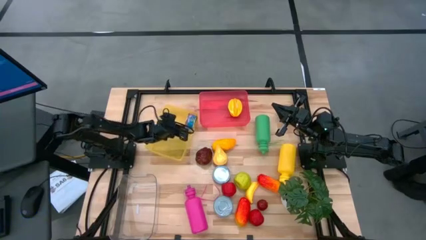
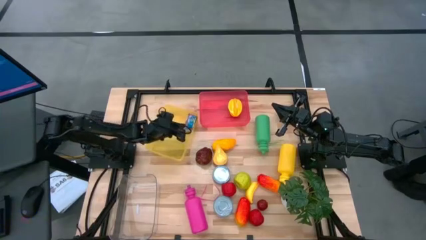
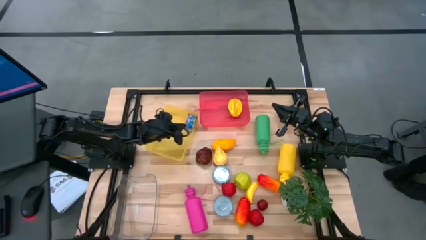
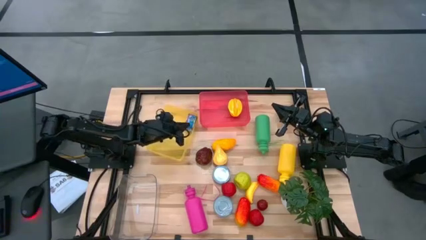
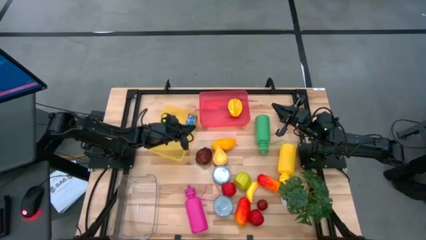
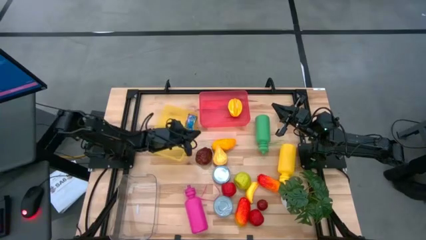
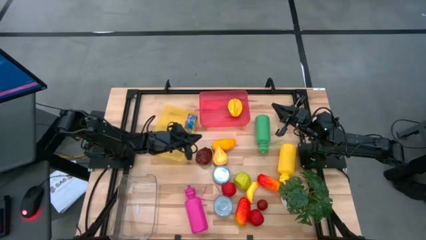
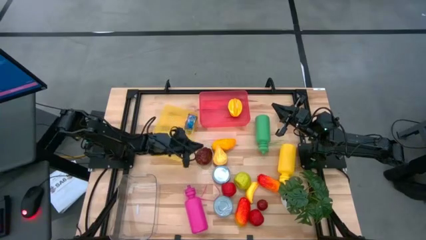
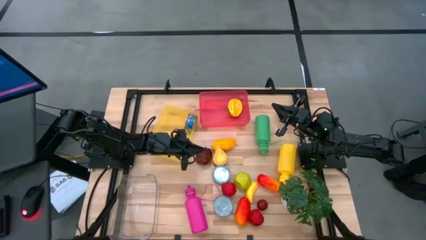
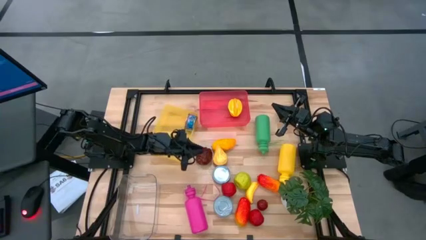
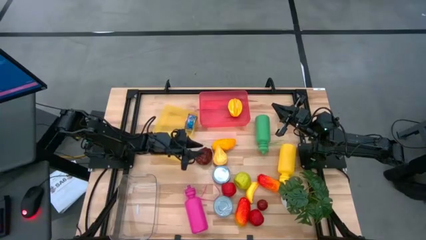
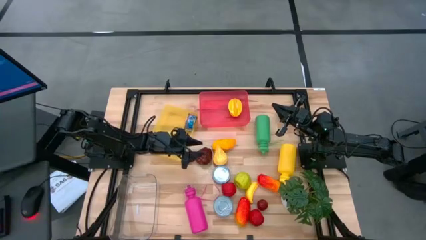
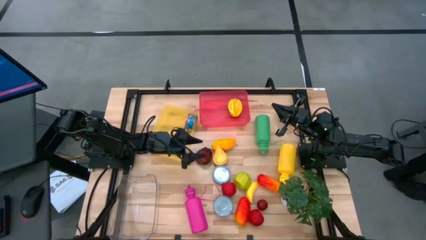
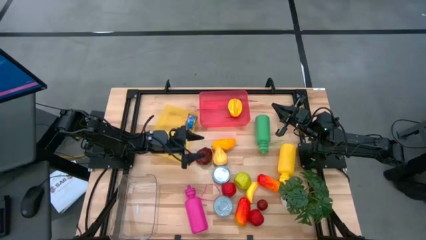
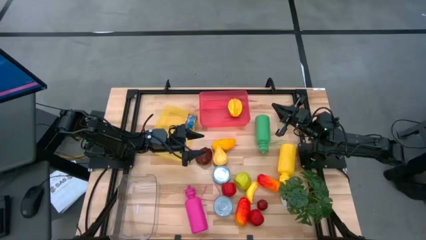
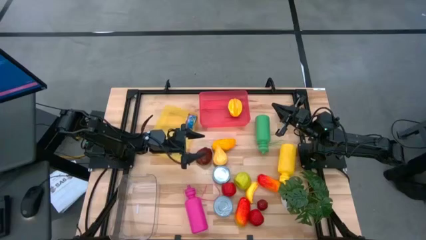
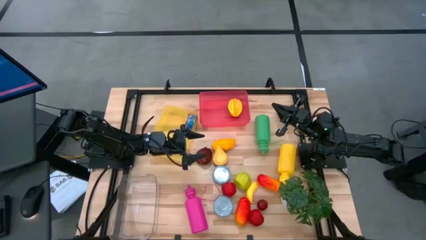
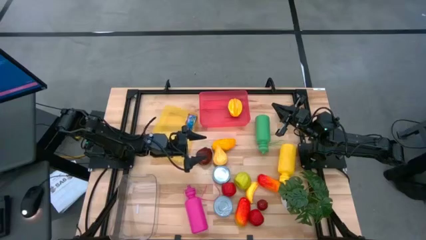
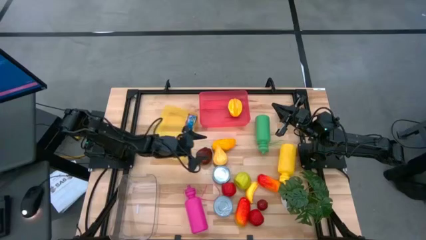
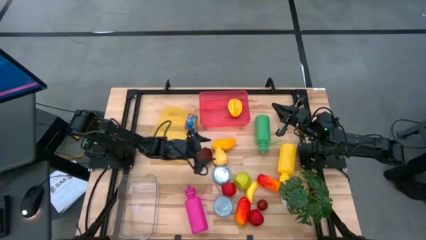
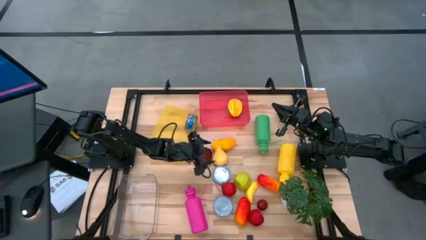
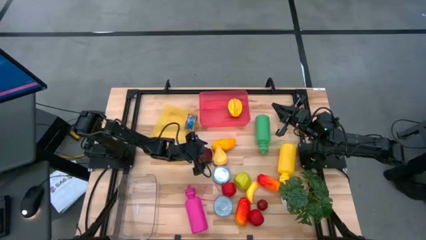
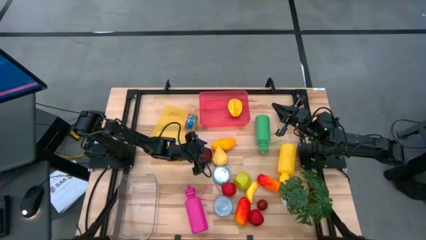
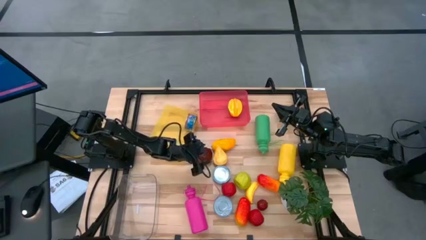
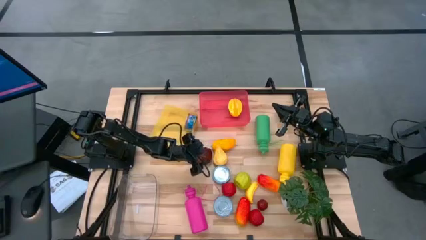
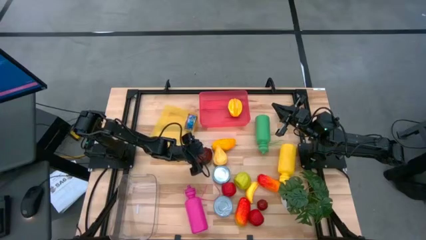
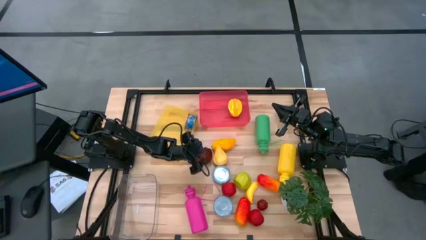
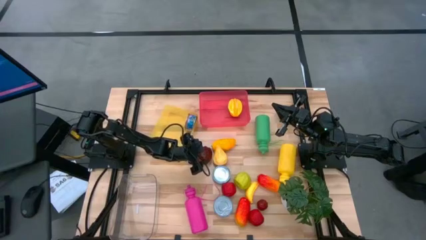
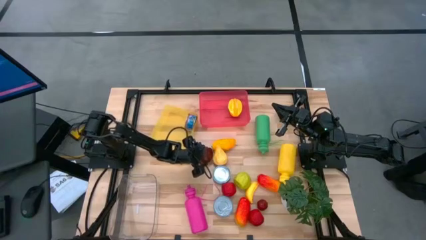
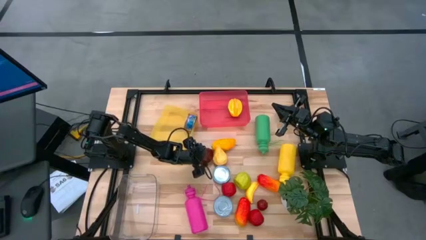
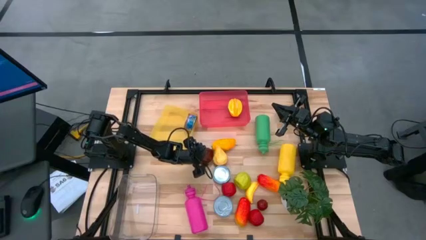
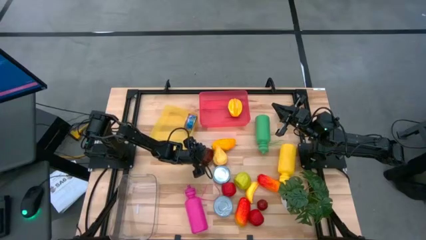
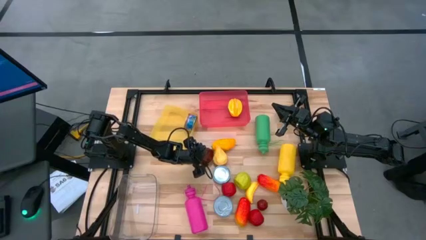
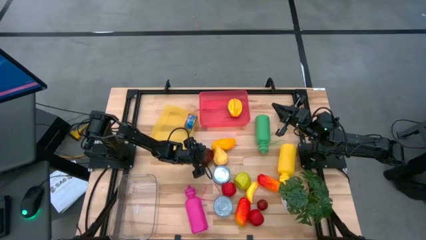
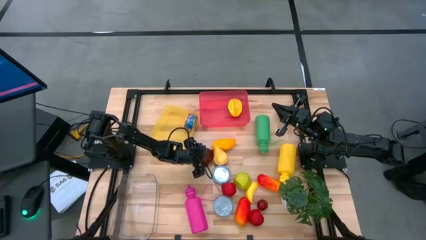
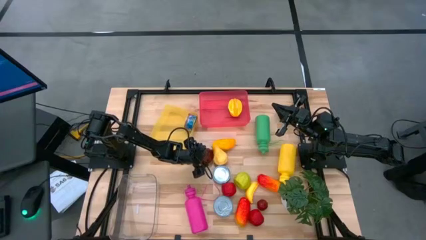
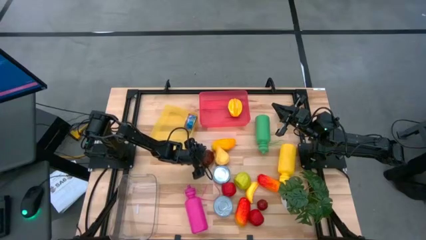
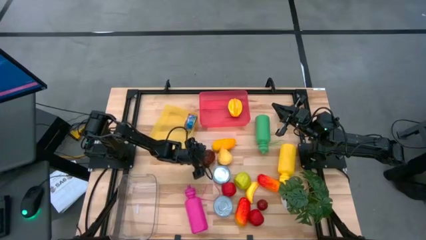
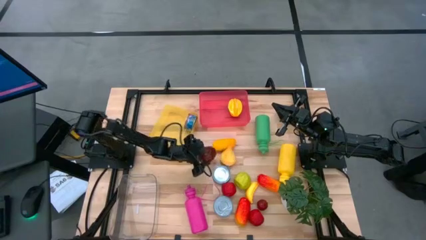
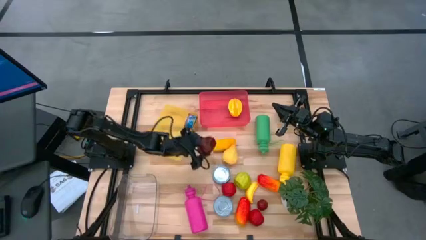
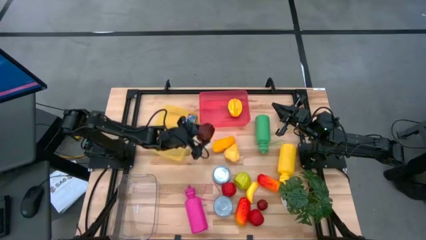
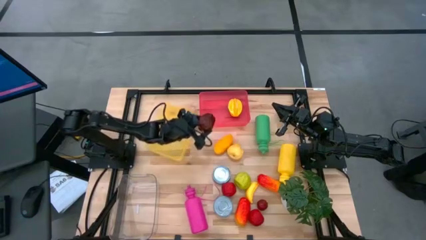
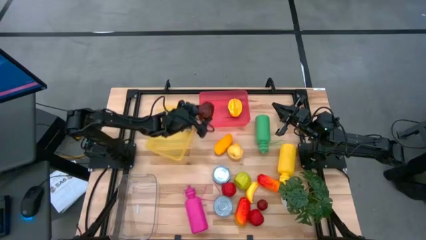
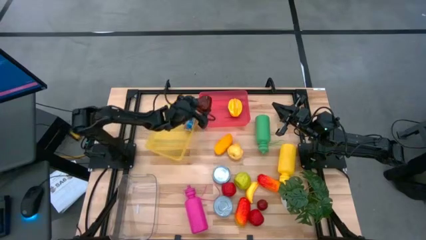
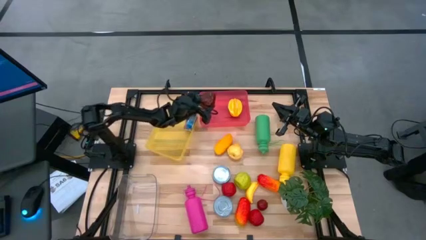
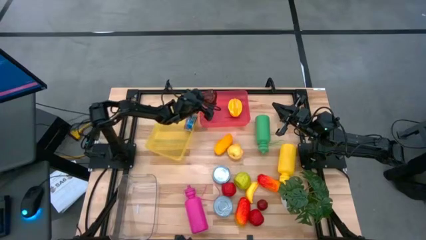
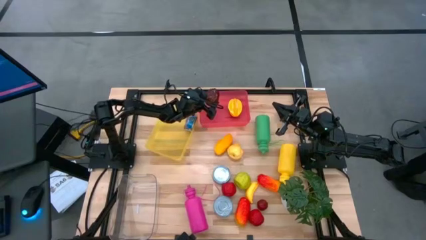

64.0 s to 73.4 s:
Task: Pick & Place Food Item
Put the left red apple into the pink bin
